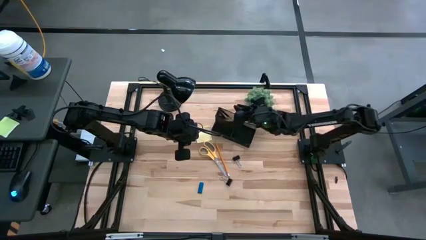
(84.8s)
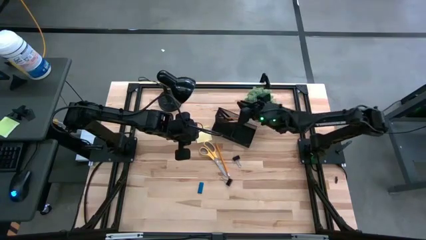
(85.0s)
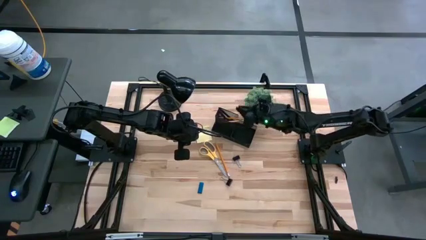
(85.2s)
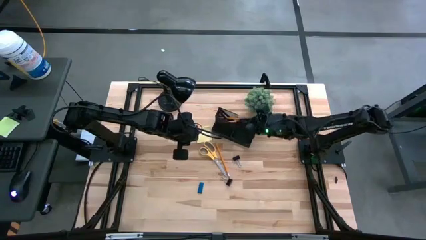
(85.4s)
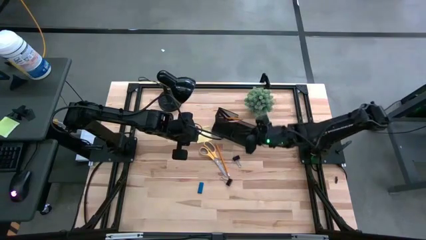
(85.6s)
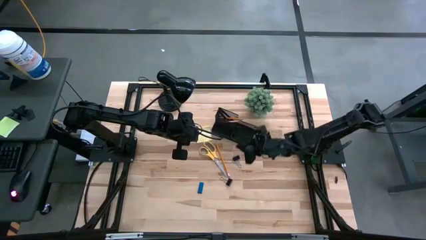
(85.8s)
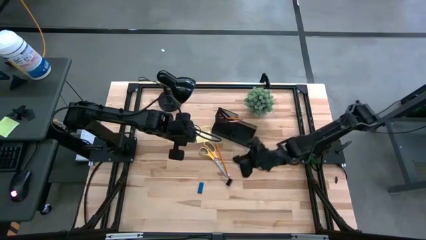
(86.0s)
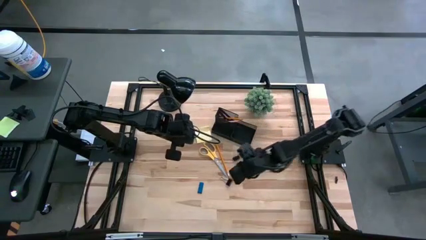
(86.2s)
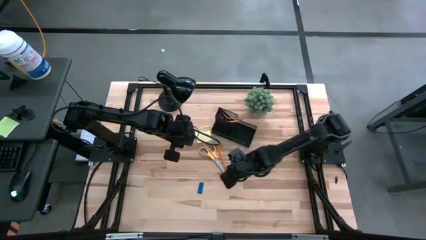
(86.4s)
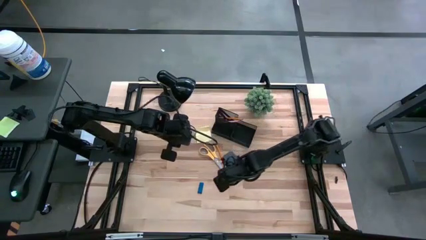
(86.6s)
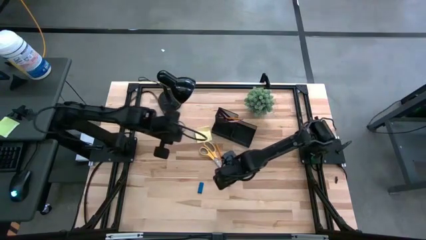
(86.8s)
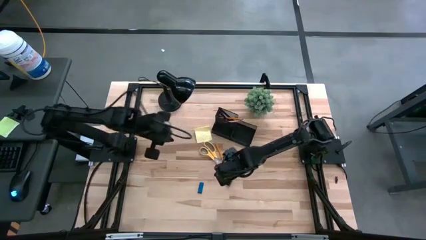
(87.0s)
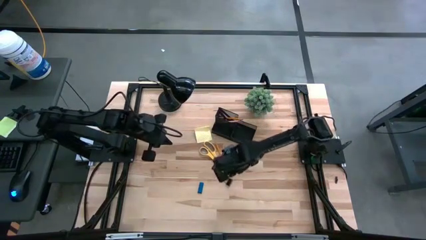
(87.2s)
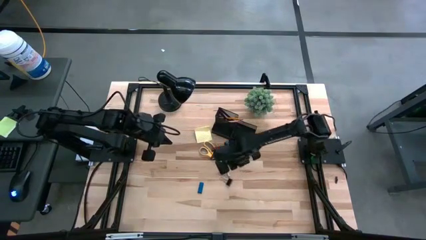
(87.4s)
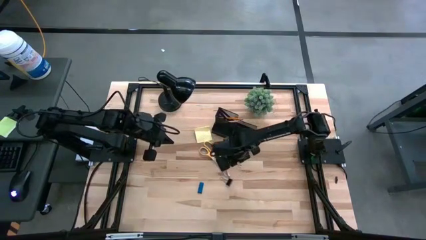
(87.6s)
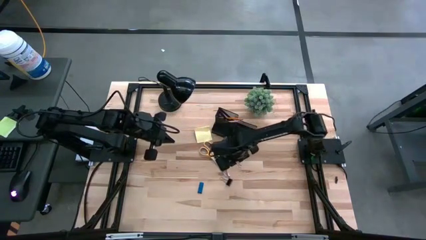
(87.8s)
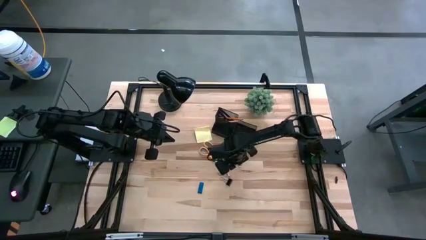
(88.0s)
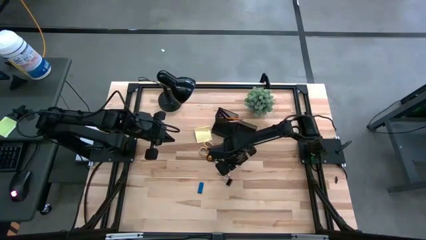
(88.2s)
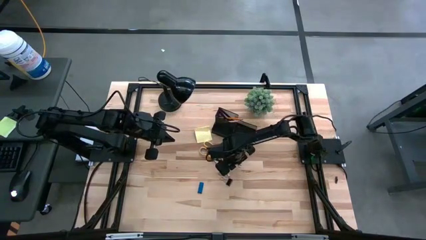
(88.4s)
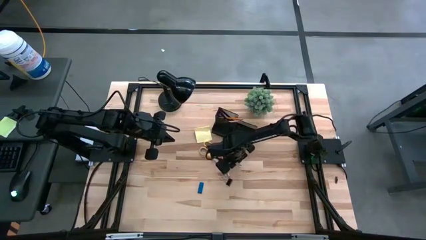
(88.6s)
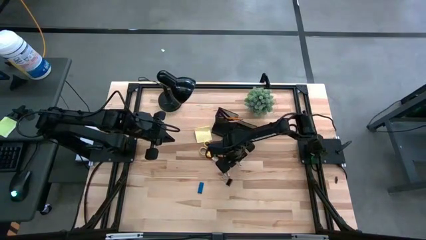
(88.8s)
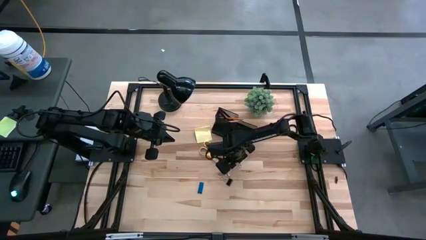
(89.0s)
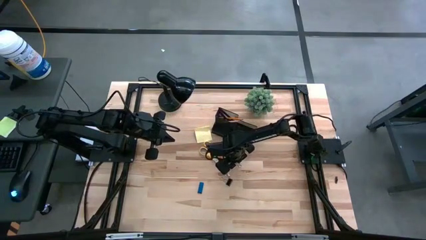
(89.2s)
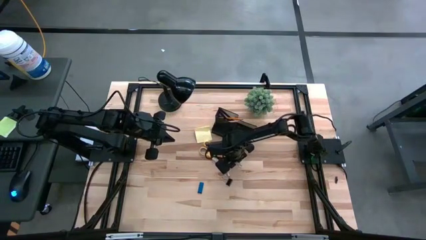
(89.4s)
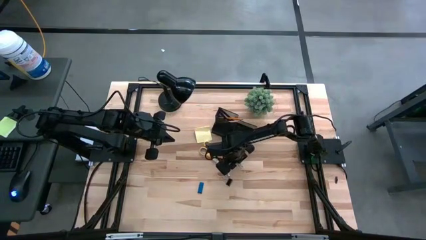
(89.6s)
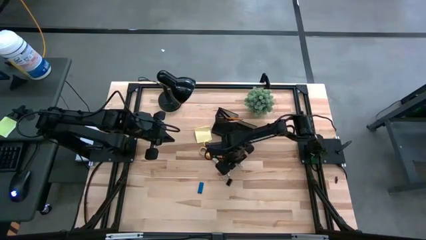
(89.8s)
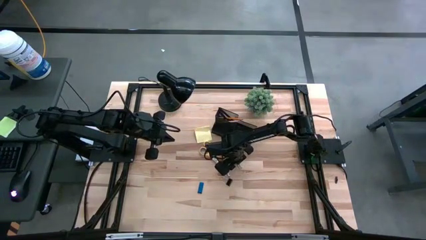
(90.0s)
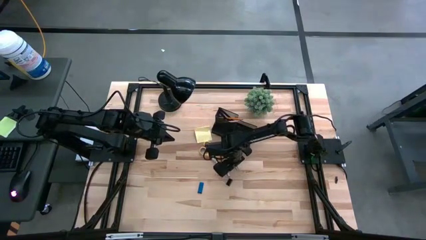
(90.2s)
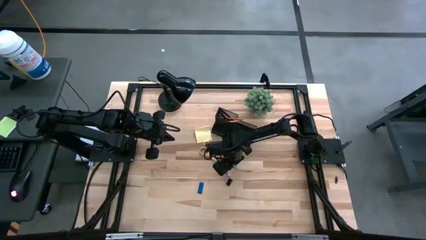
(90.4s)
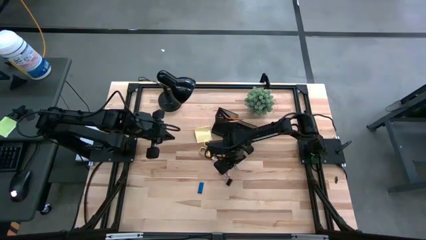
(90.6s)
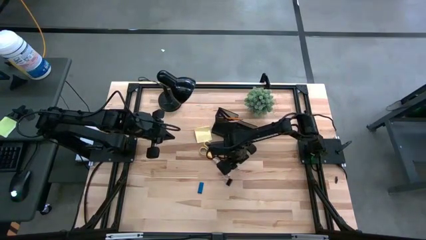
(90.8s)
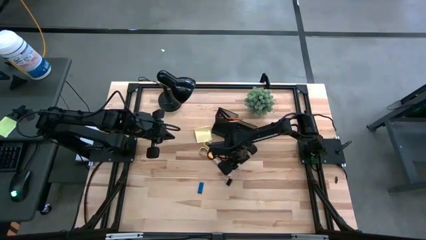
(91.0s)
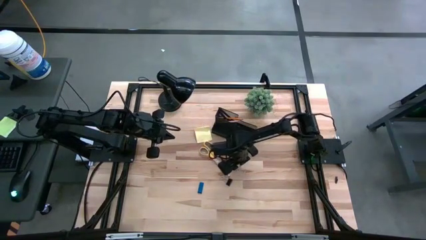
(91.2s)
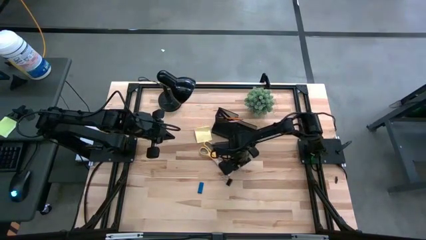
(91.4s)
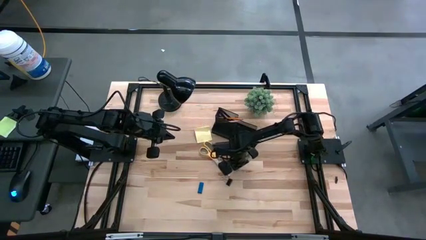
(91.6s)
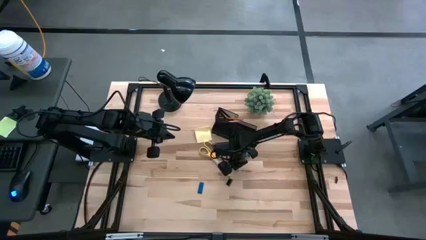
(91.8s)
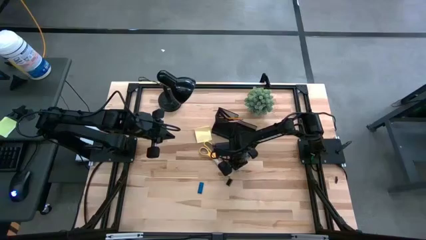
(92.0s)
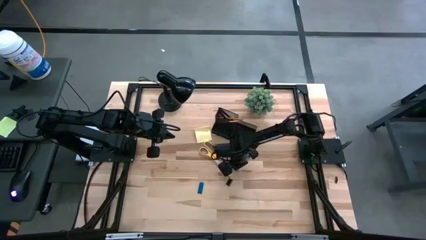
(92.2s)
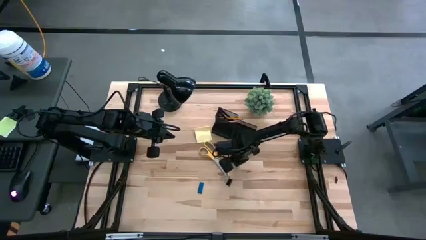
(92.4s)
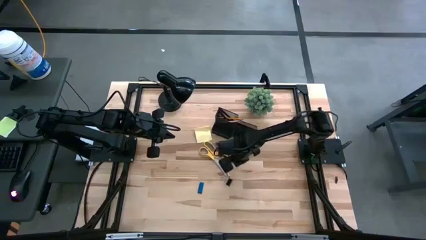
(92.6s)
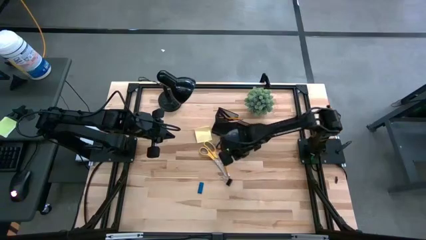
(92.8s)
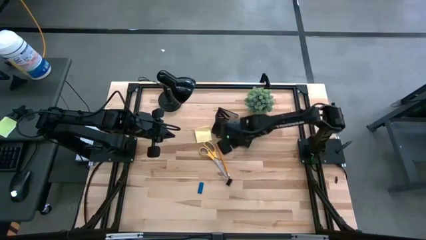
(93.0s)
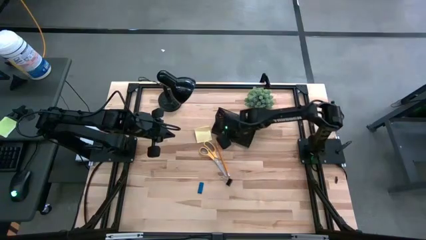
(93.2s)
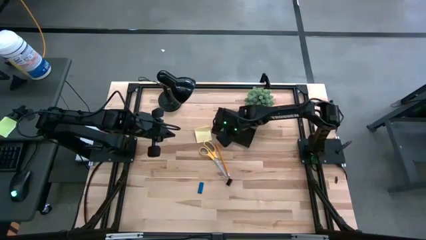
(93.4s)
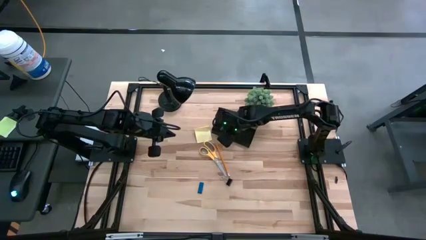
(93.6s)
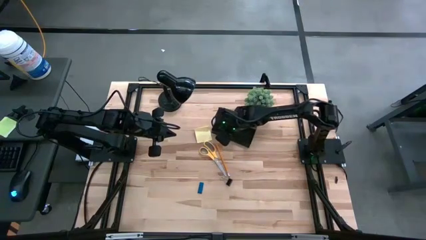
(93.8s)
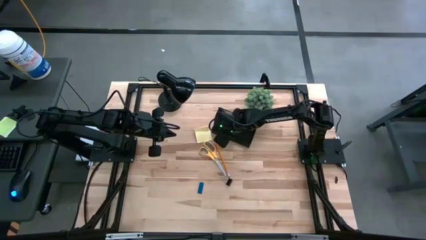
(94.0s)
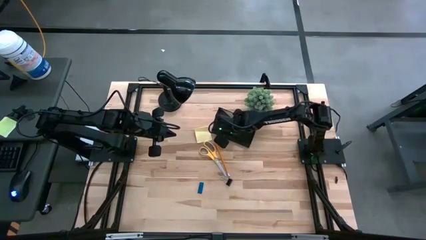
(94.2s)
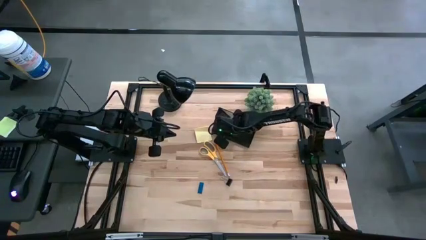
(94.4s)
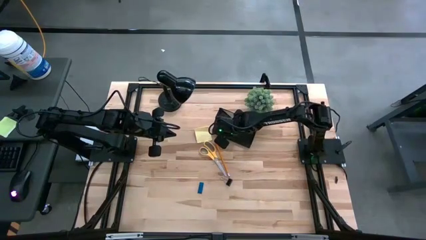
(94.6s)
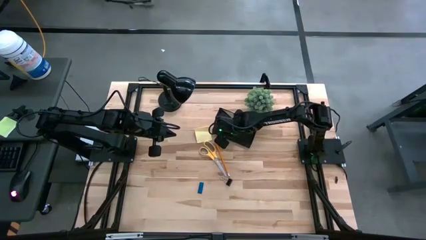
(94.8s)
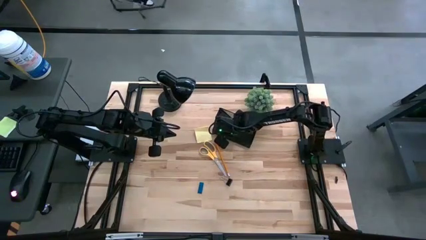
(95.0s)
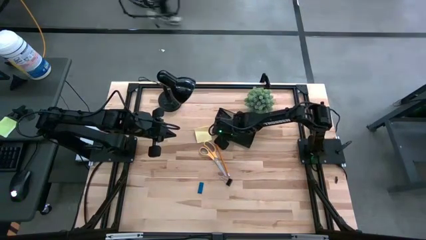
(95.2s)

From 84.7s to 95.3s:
Task: Pick and place office supplies into organizer
Put the top binder clip into the desk organizer

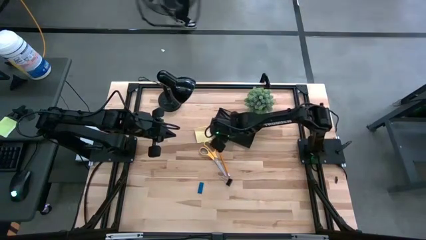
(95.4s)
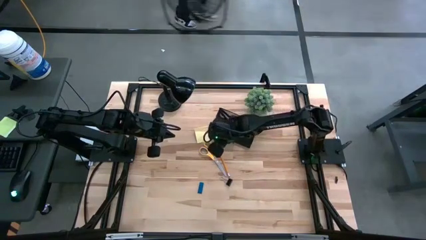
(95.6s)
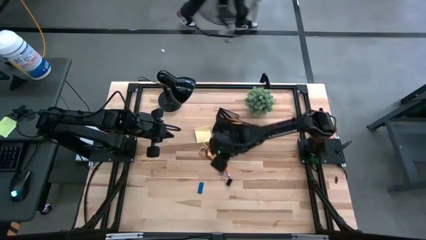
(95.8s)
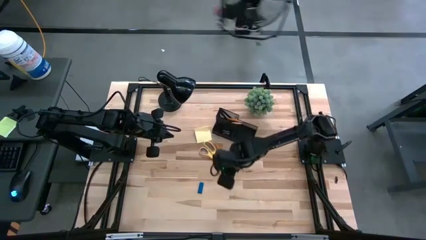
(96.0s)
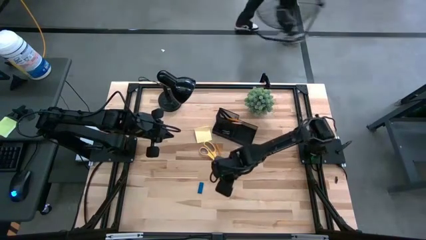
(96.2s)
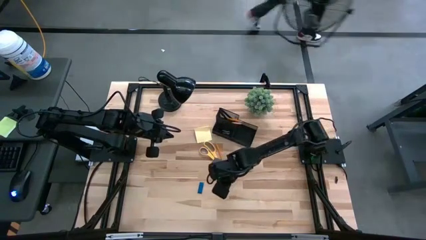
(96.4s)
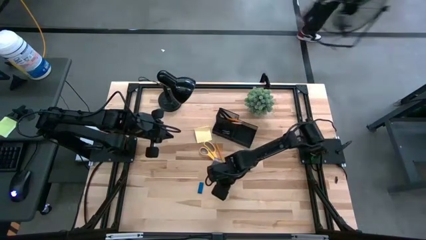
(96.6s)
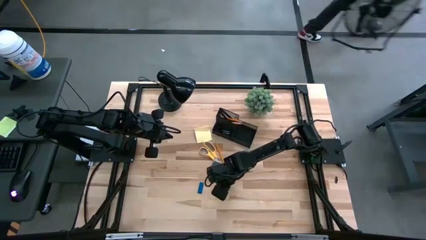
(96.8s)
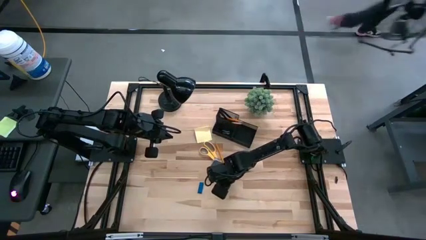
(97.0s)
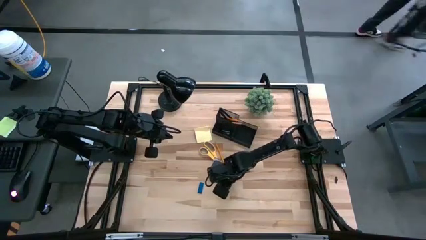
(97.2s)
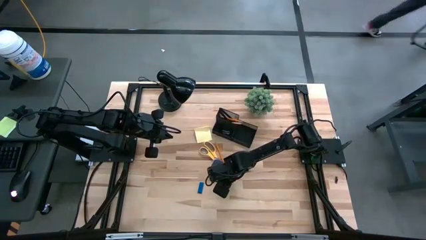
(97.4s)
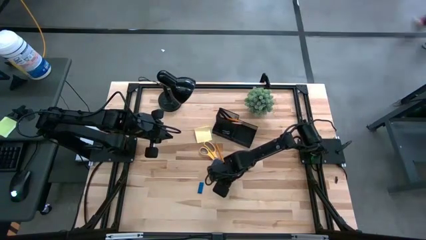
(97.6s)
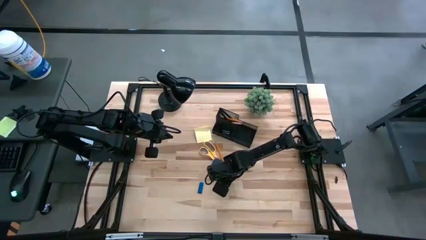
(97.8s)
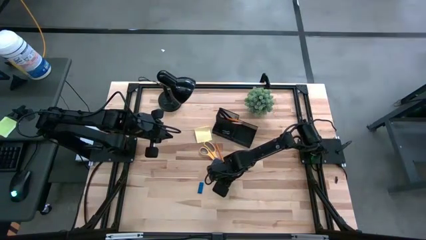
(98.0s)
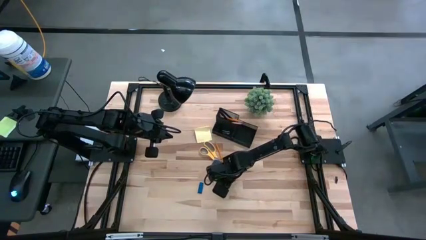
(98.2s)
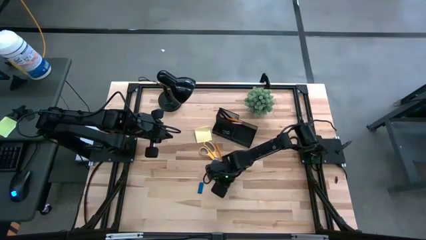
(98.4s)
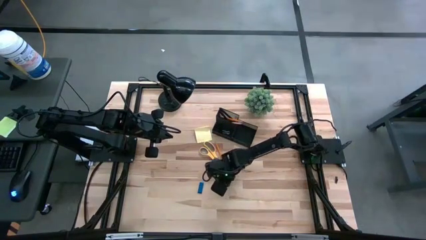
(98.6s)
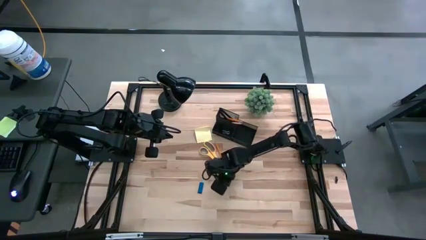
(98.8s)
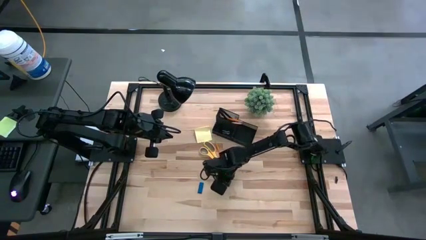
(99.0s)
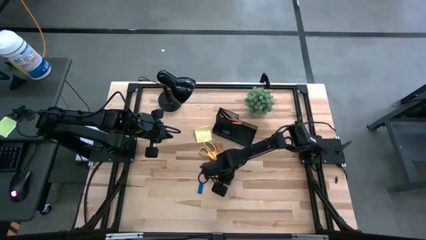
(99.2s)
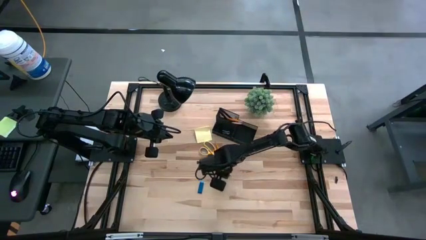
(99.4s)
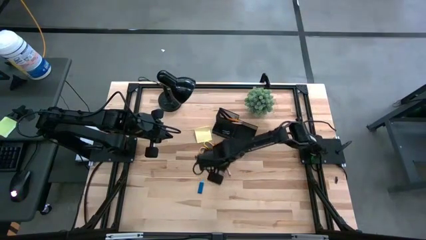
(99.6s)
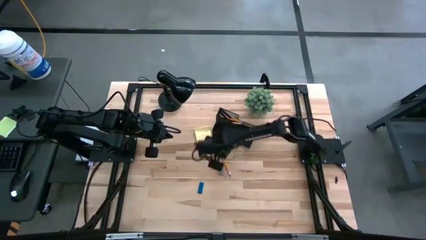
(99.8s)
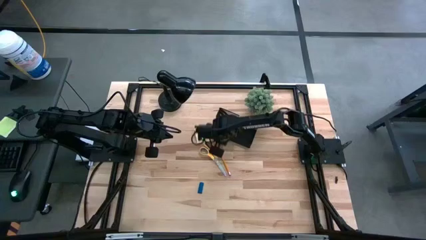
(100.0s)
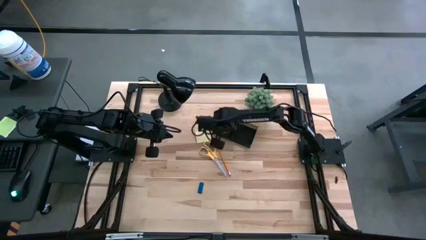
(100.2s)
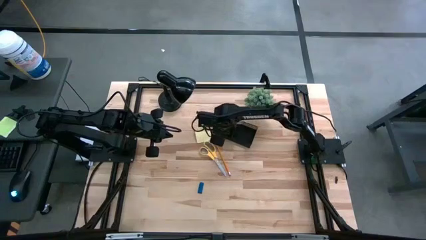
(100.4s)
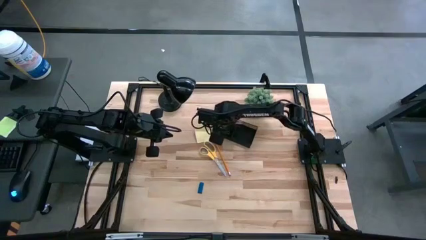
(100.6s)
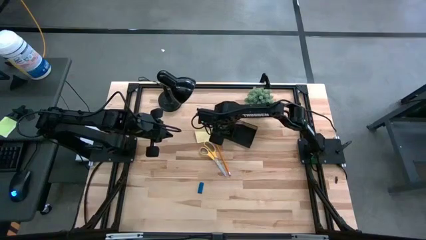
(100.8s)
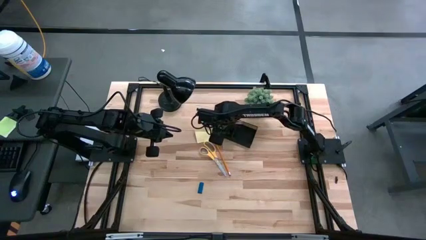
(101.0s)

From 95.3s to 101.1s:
Put the binder clip into the desk organizer
